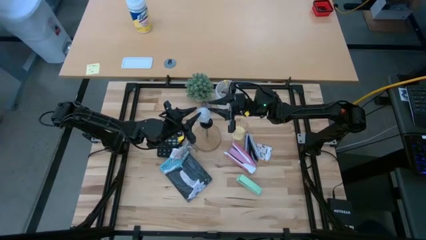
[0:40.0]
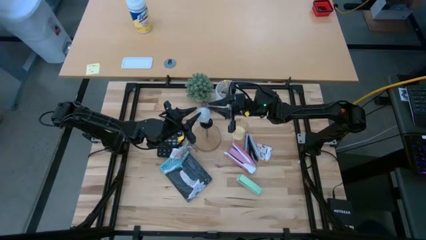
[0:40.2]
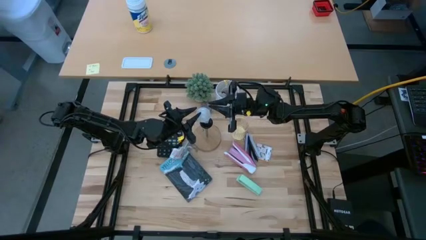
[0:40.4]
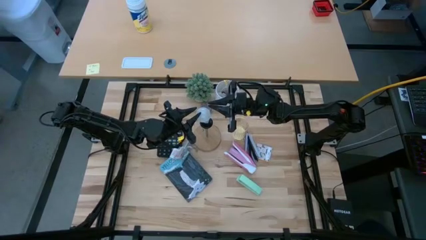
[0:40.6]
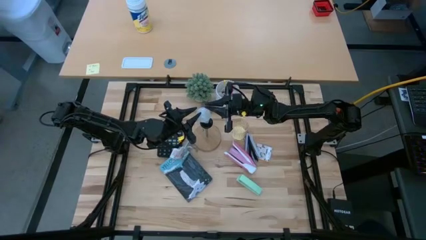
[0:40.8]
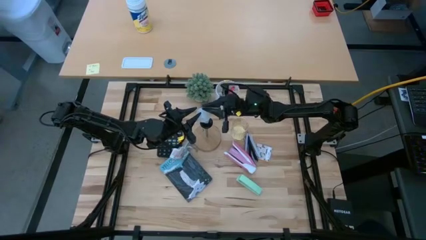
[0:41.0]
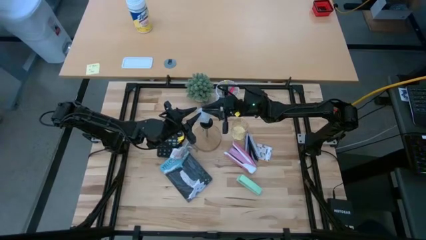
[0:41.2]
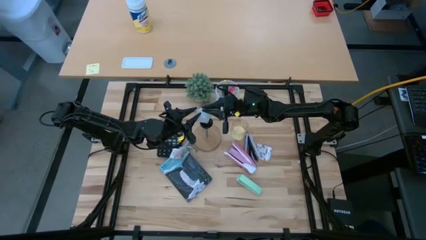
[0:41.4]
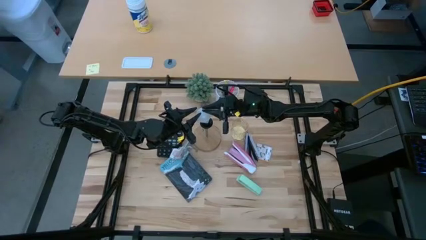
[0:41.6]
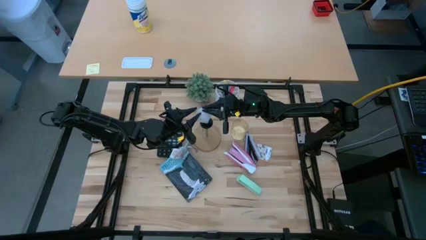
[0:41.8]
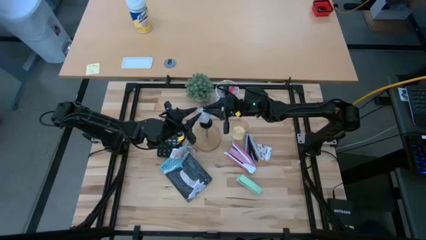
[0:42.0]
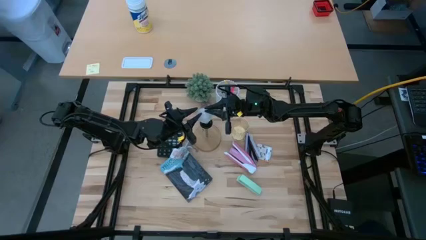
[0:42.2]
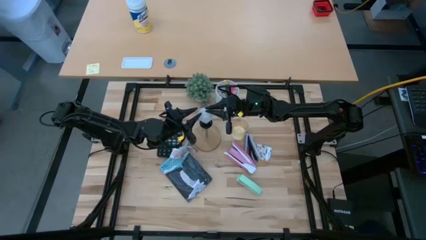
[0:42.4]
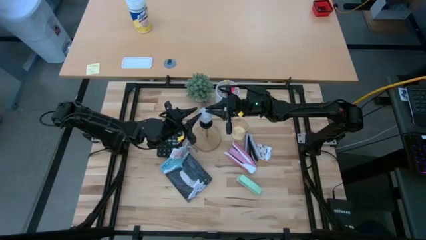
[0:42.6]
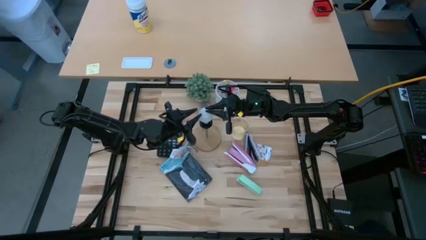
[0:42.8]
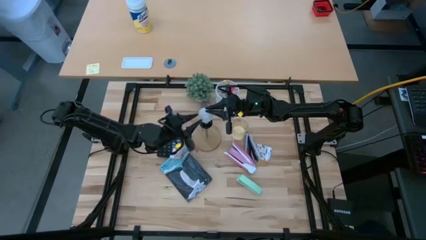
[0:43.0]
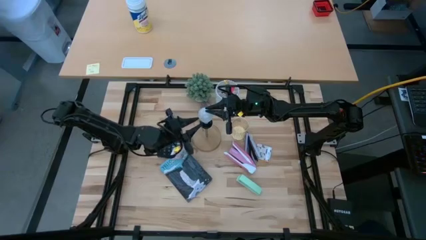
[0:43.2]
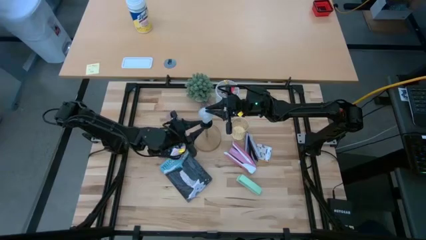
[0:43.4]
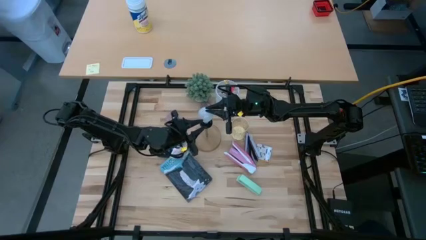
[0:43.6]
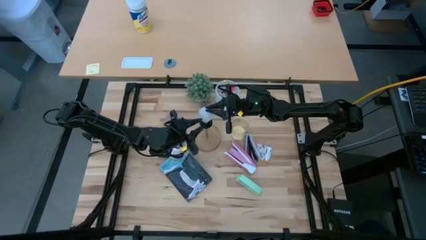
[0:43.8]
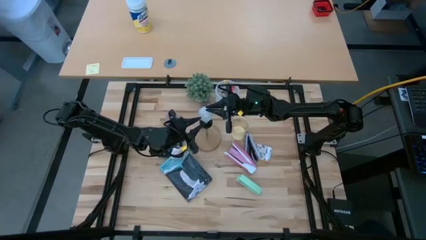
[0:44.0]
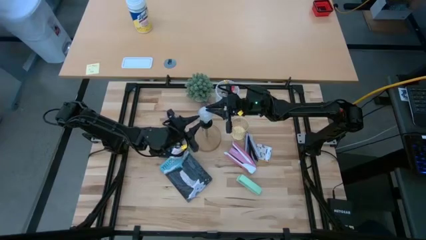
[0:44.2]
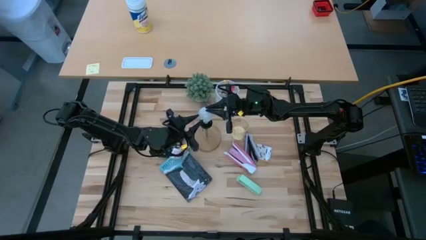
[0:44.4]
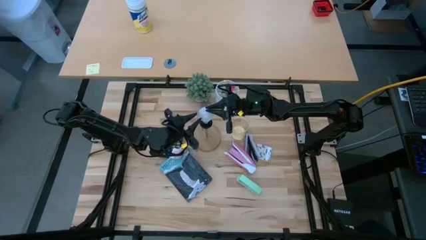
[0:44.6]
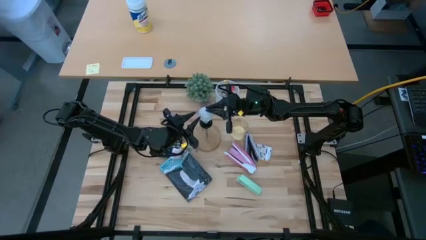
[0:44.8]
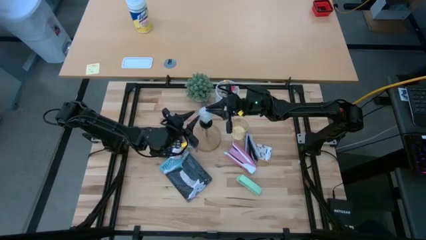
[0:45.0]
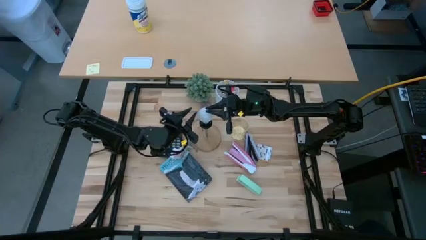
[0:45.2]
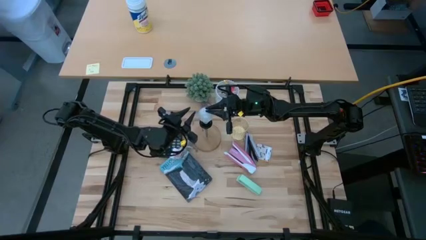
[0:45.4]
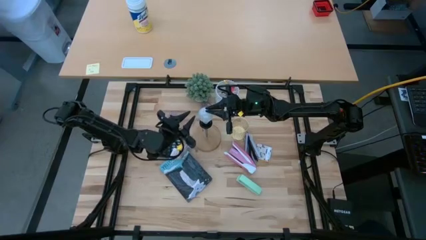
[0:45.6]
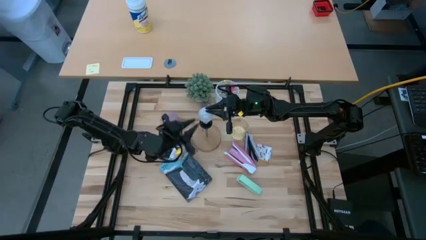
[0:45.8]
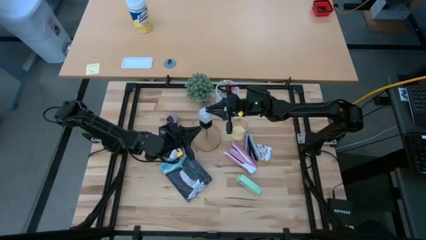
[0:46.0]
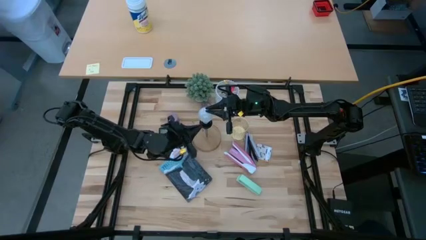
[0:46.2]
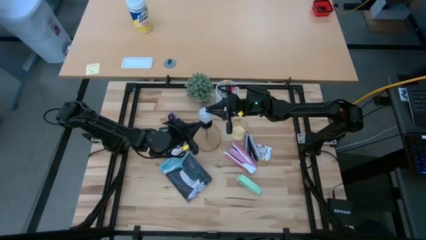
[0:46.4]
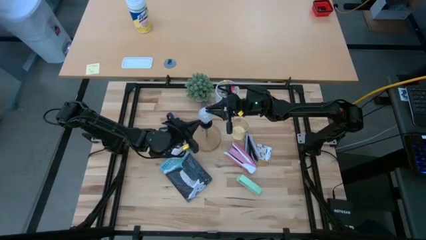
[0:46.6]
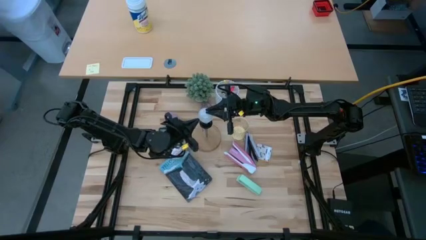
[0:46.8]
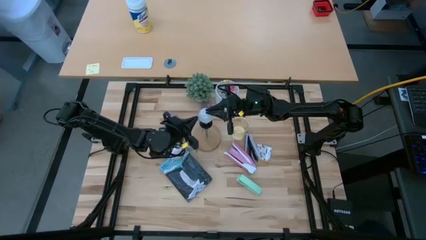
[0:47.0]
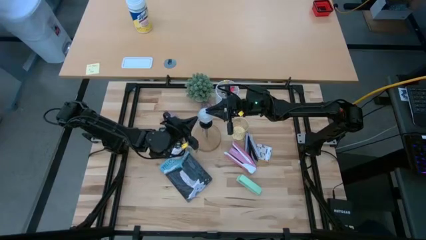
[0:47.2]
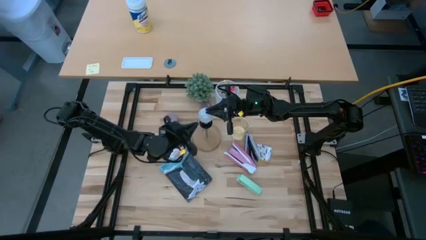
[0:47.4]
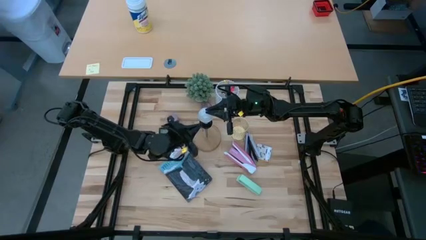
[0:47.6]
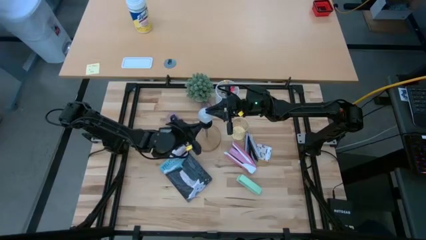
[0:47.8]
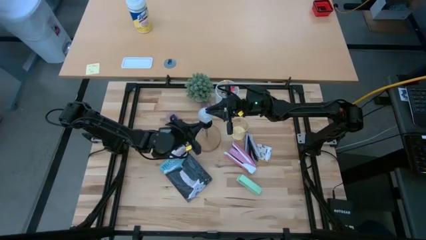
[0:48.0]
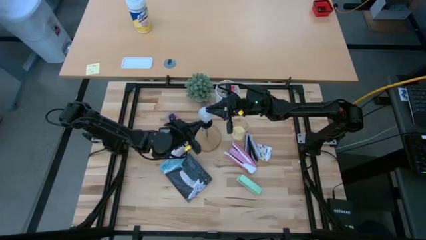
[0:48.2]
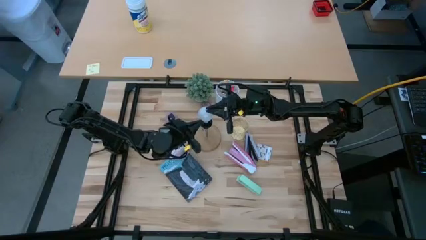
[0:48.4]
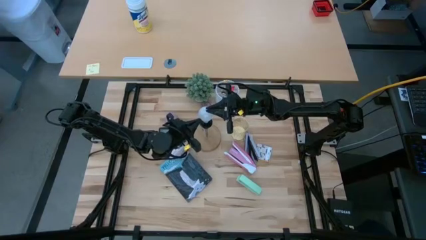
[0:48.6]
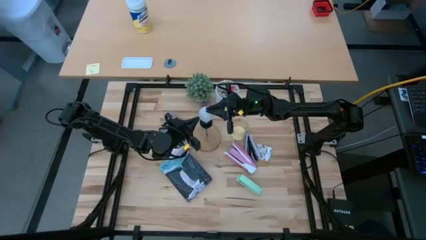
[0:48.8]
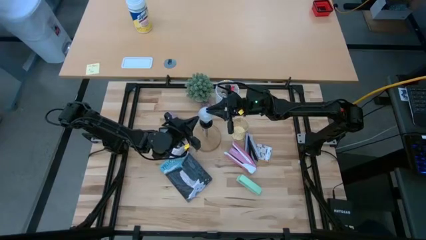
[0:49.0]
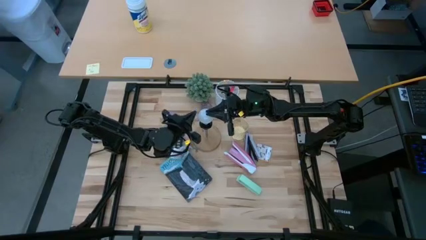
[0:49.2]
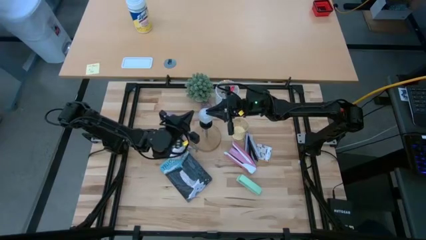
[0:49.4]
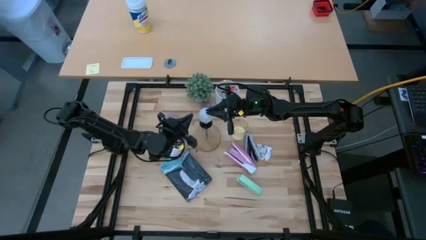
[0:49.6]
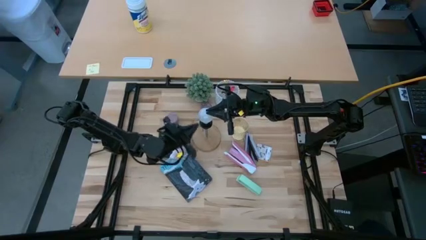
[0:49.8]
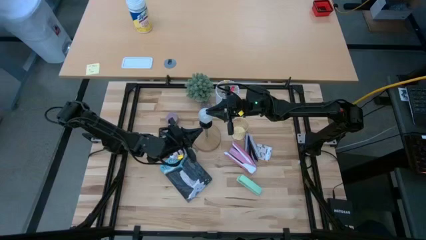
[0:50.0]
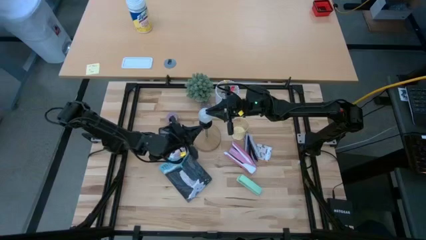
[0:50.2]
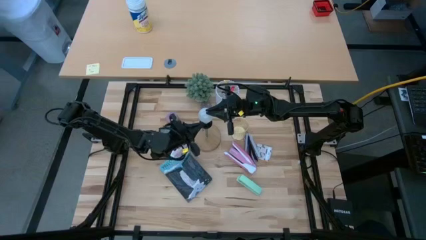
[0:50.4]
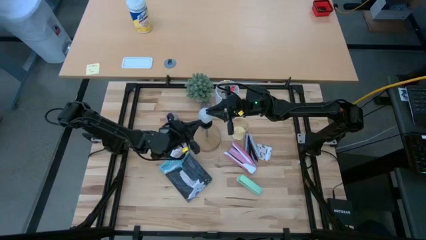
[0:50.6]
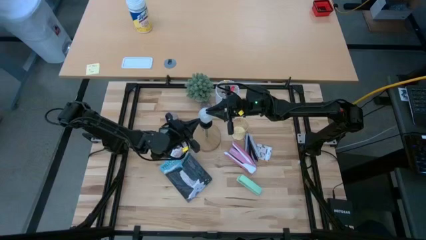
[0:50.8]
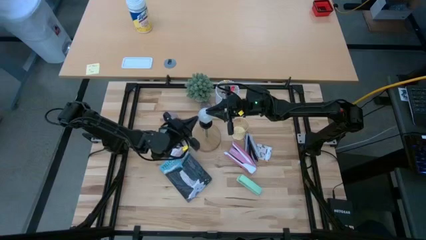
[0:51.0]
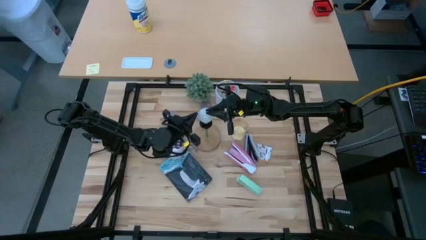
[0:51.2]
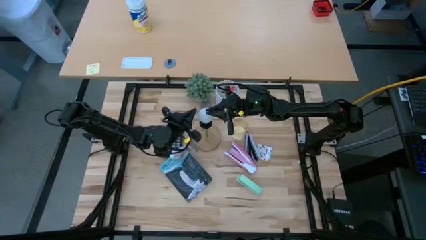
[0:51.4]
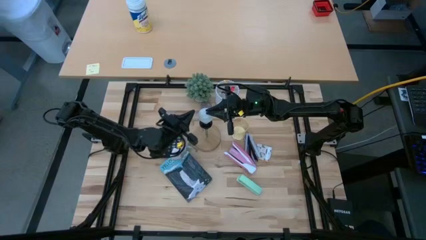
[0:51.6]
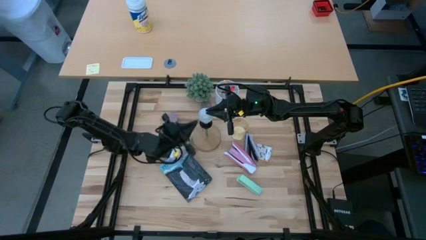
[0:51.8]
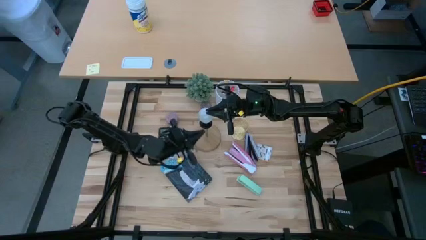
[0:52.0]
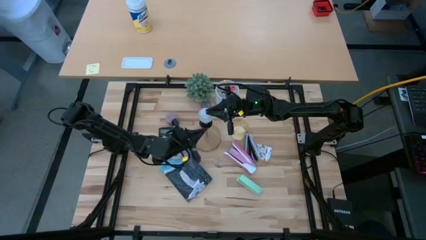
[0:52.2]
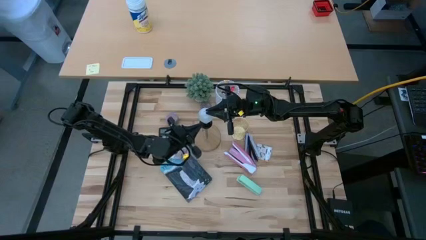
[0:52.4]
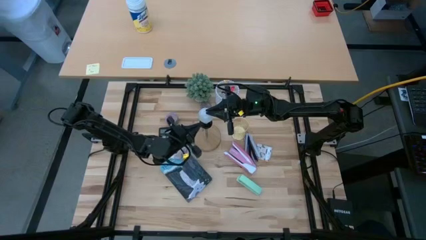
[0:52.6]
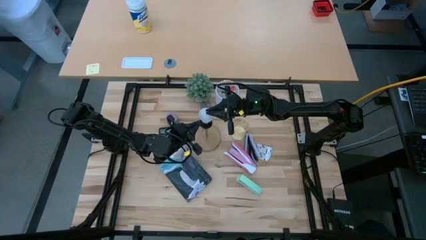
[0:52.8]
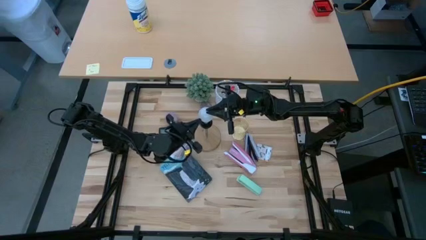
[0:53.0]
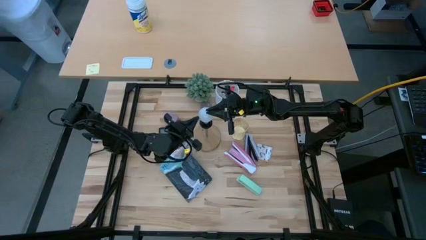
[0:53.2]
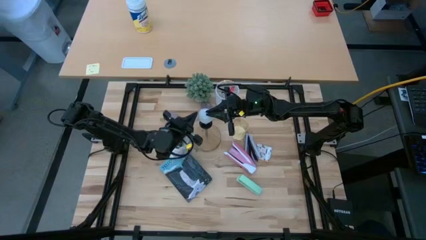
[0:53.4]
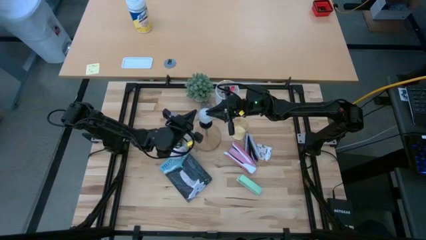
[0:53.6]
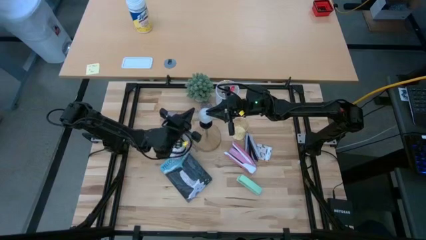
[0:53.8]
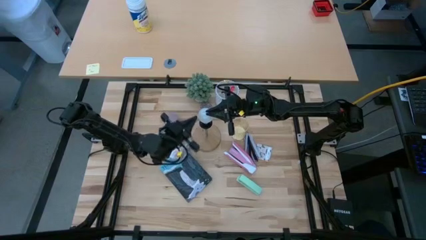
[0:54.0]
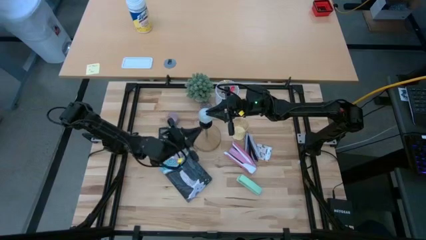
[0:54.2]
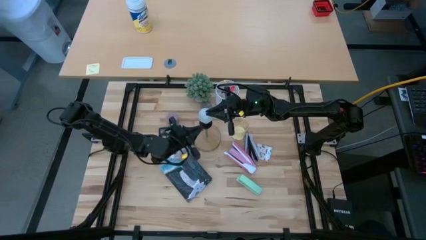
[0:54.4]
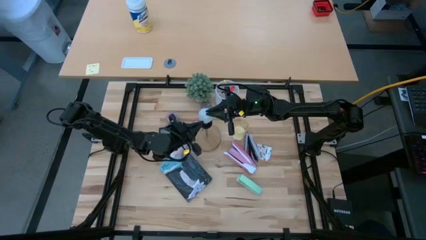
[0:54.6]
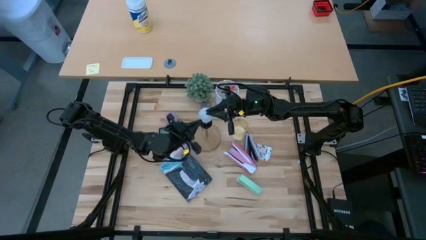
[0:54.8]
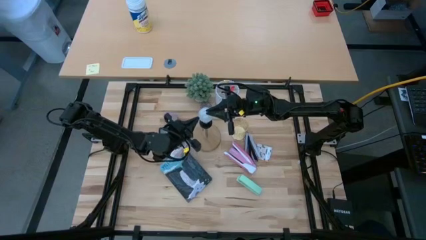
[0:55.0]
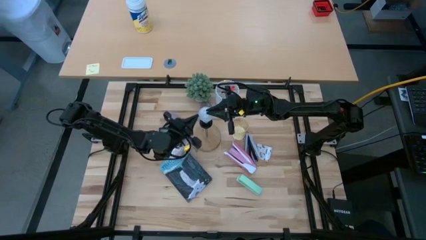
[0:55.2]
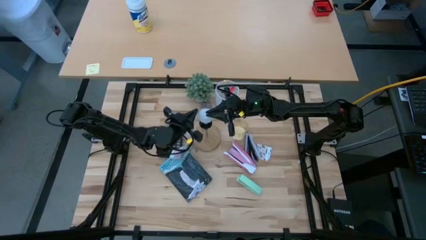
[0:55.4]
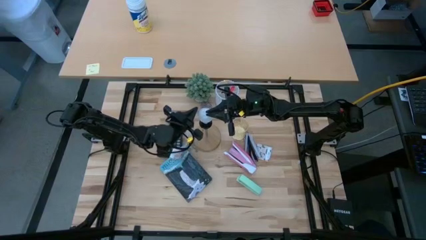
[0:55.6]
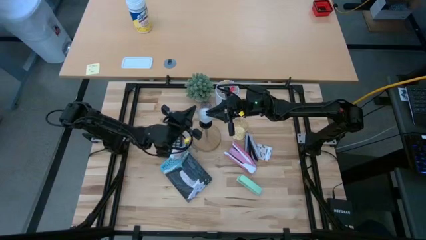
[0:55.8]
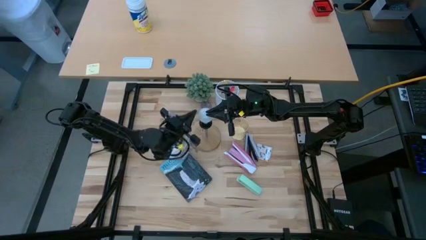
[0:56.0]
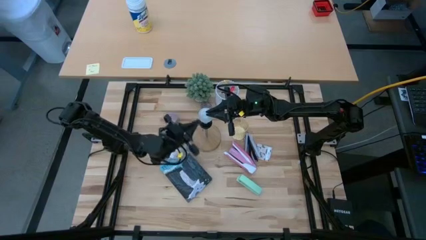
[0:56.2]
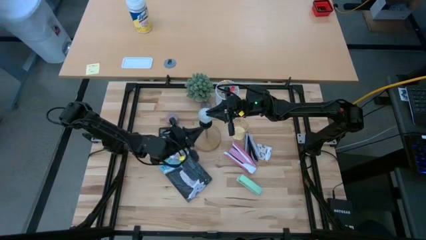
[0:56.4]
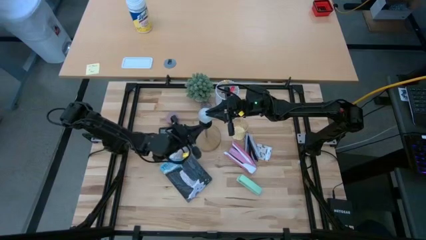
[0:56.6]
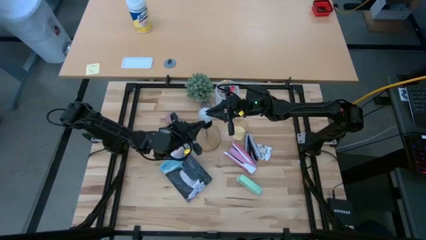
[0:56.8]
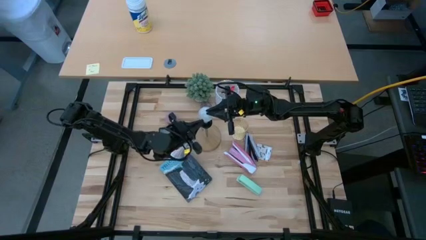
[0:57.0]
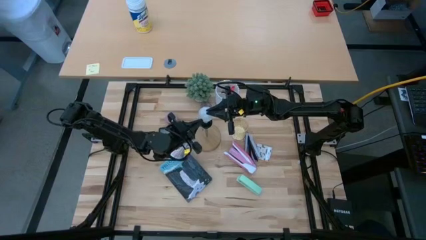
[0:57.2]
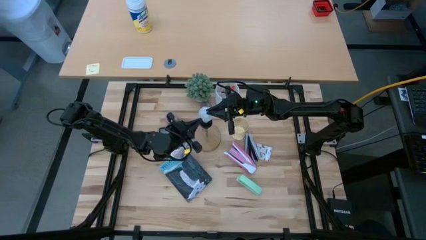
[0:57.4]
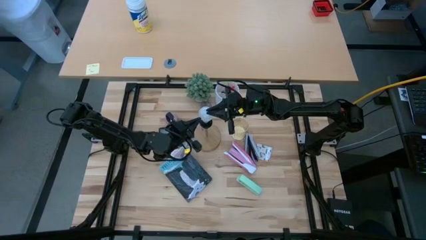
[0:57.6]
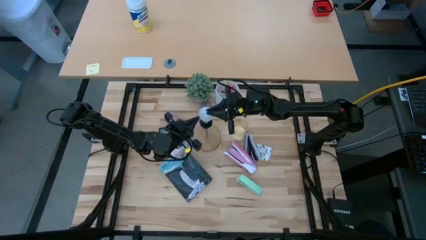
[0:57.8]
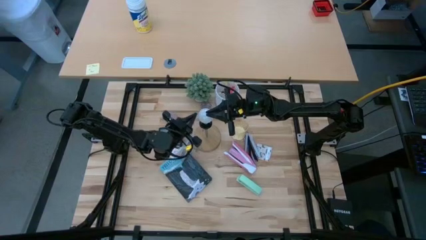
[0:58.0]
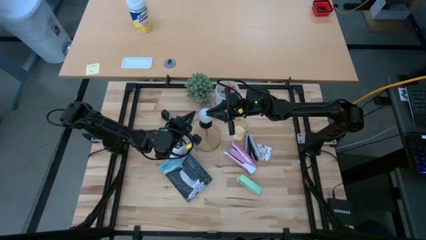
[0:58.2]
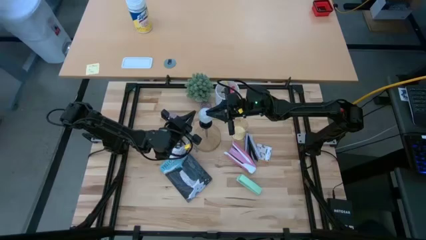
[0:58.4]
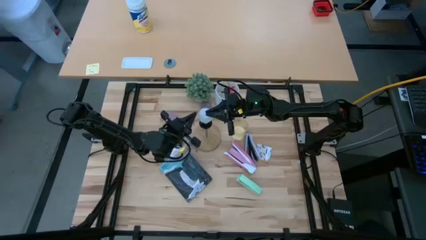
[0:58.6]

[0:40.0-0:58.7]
Task: Screw lightbulb
Insert the lightbulb into the lamp
